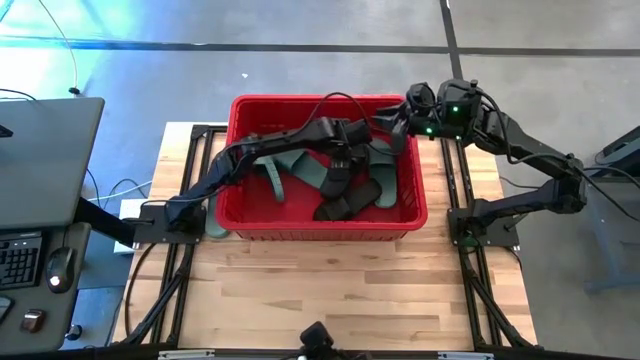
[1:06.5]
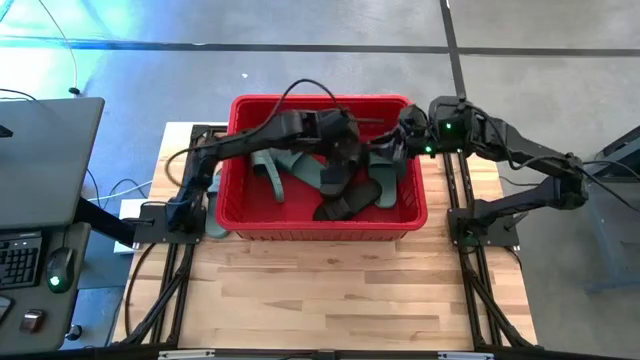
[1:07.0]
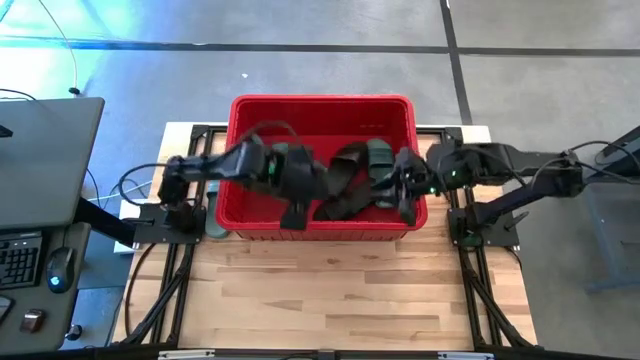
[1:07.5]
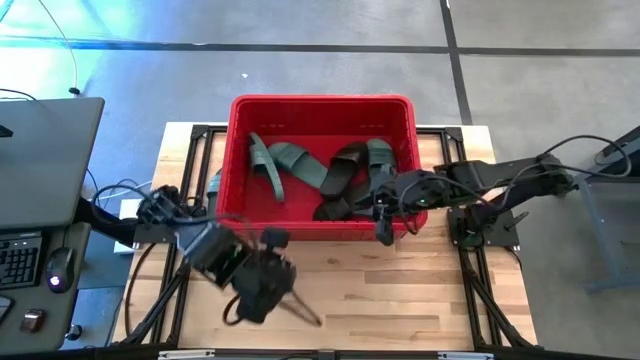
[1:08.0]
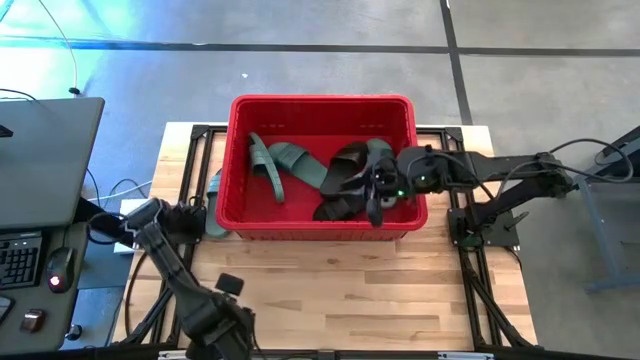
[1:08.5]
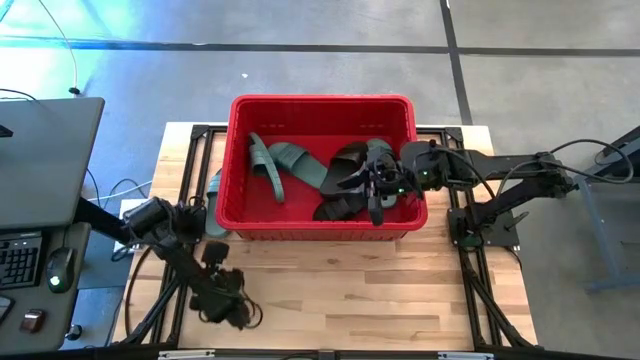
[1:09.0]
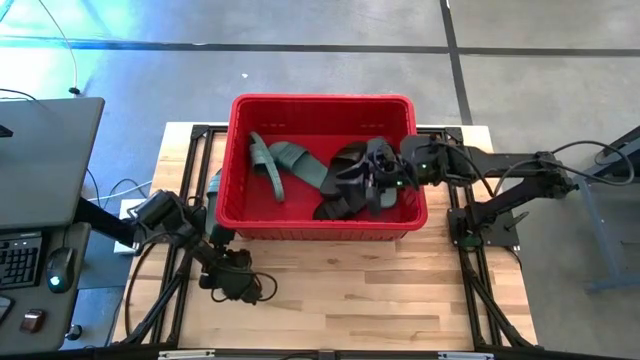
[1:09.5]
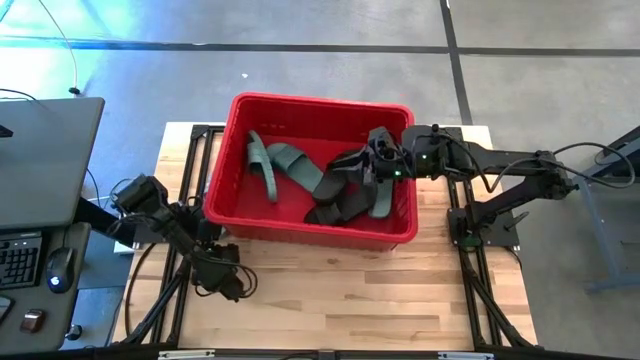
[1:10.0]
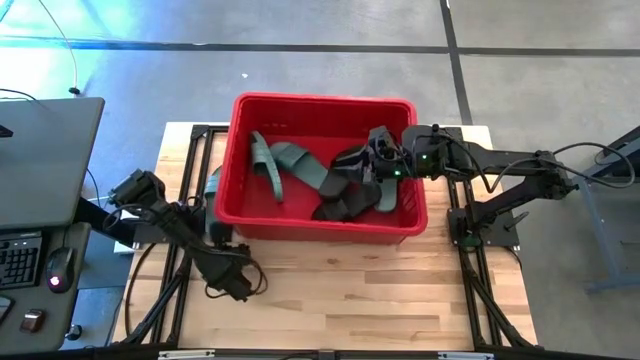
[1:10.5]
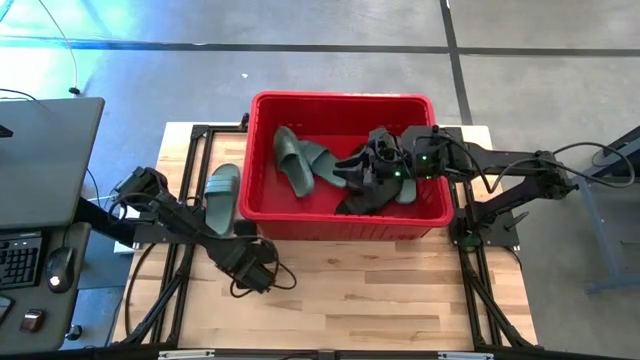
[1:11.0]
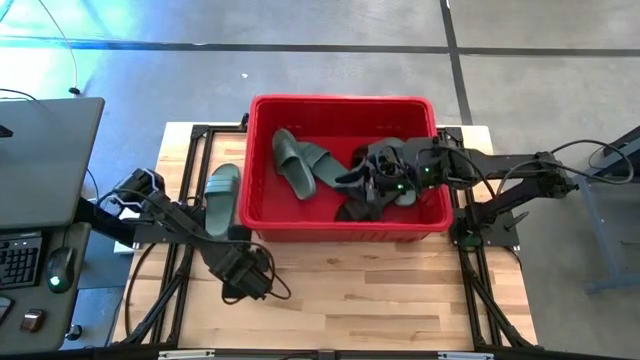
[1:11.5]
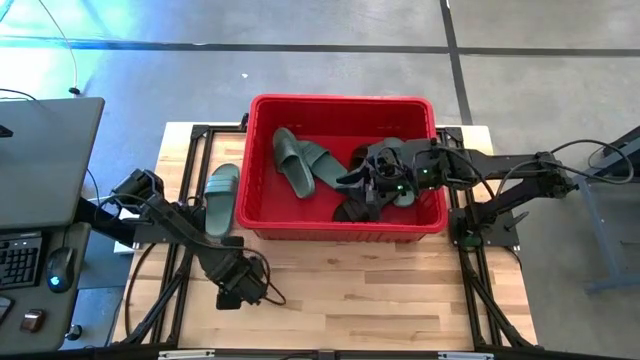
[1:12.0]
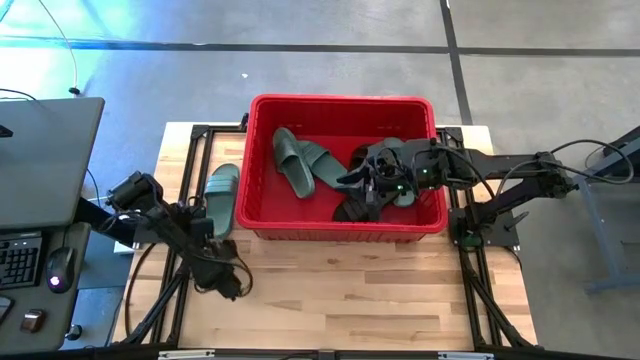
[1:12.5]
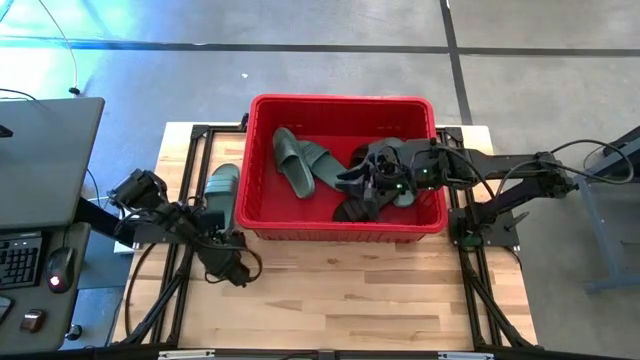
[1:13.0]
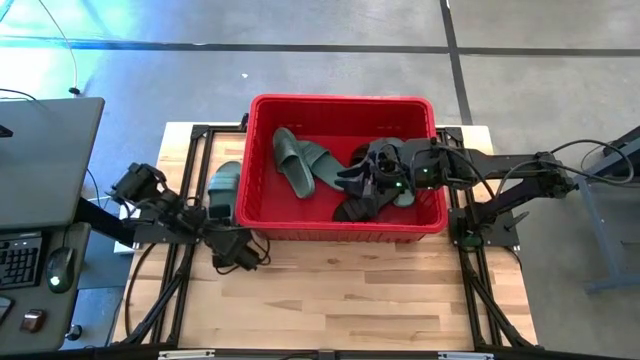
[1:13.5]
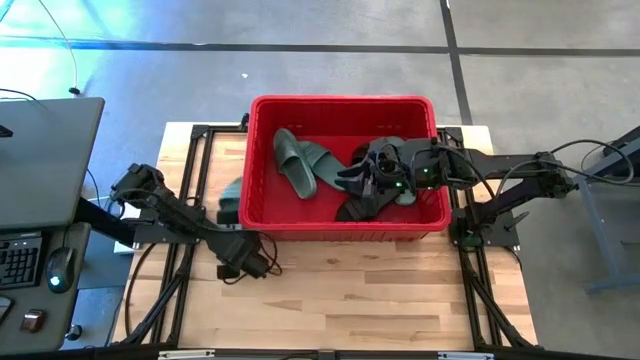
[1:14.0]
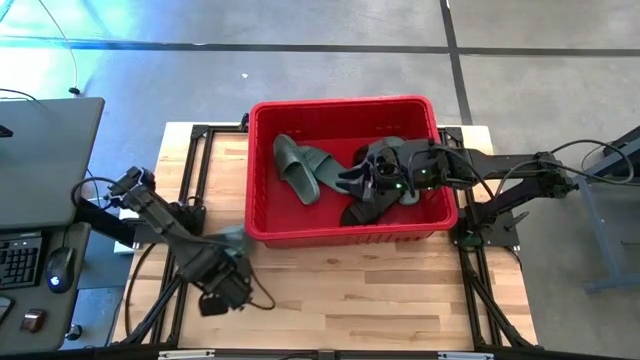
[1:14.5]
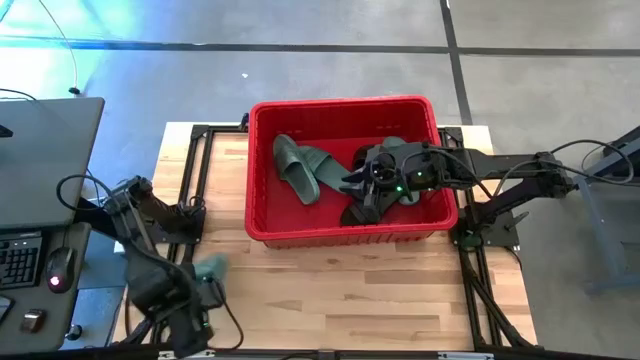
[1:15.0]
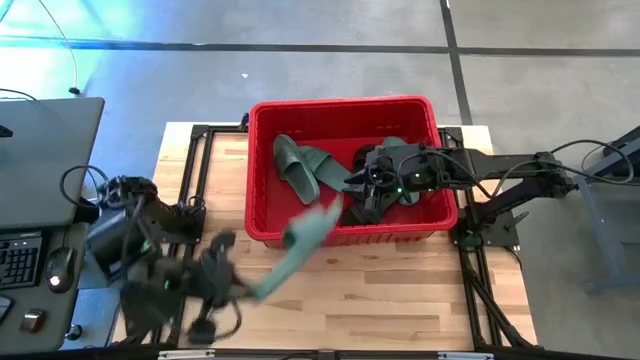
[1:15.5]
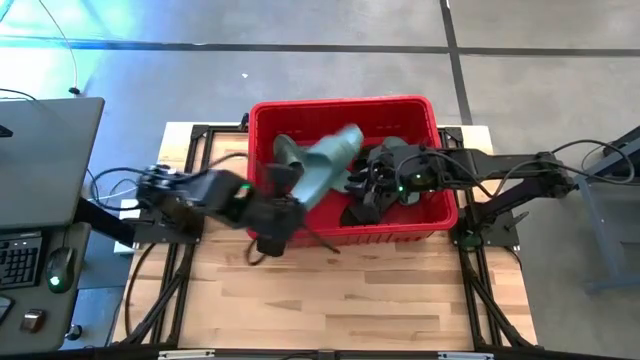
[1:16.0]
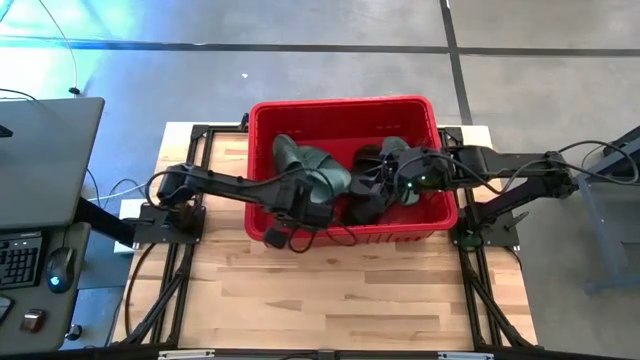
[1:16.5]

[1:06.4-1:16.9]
Task: Pick and place slides into bin
Put the green slide into the red bin

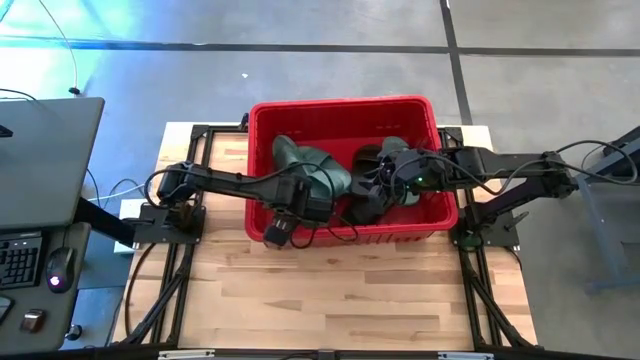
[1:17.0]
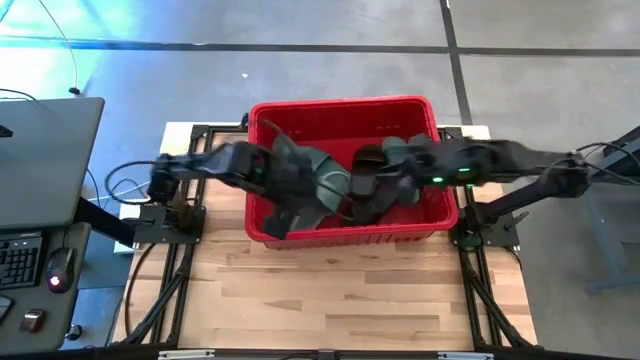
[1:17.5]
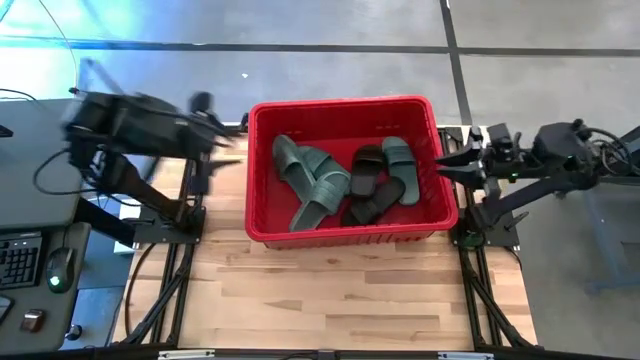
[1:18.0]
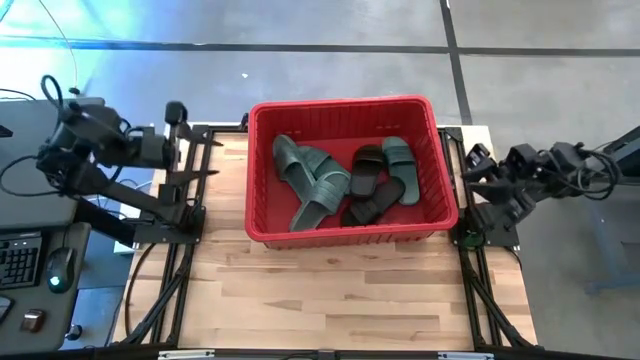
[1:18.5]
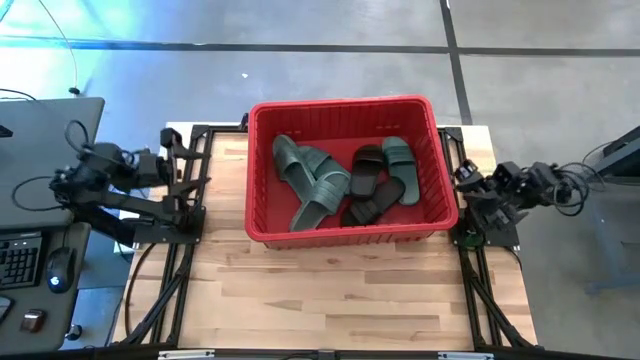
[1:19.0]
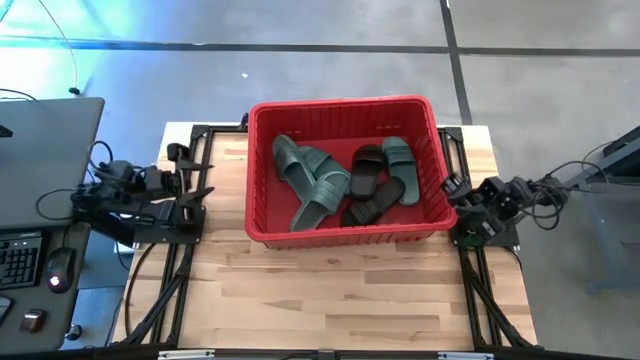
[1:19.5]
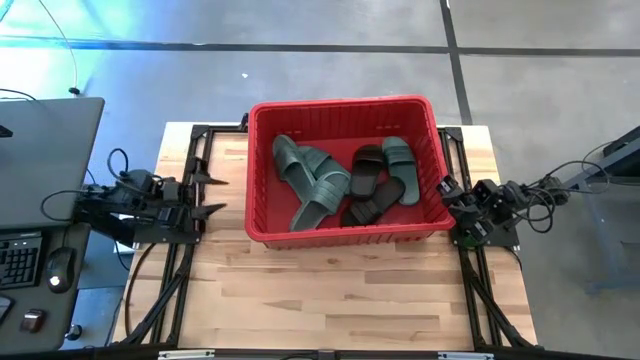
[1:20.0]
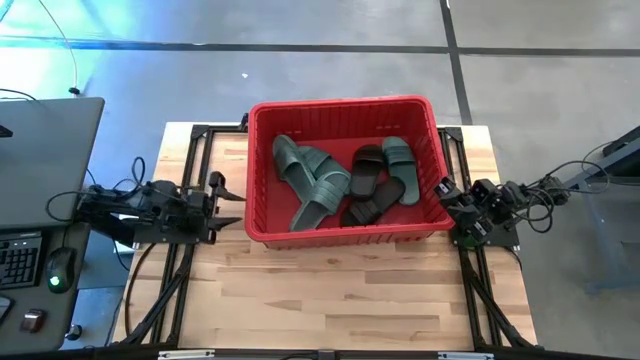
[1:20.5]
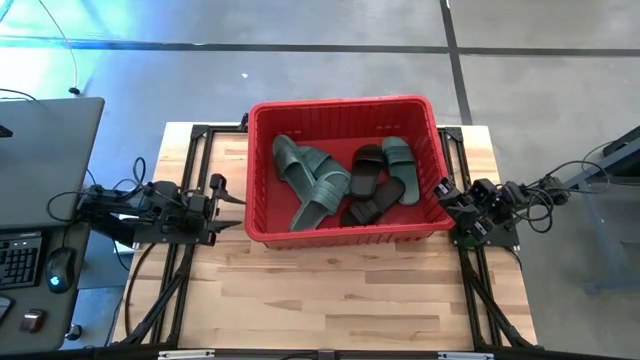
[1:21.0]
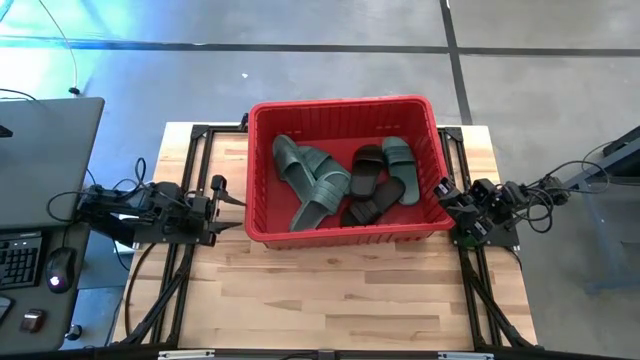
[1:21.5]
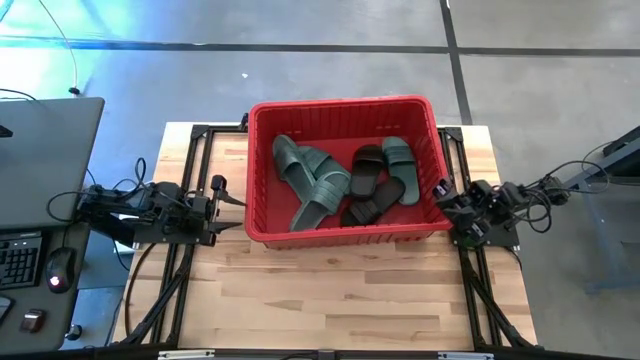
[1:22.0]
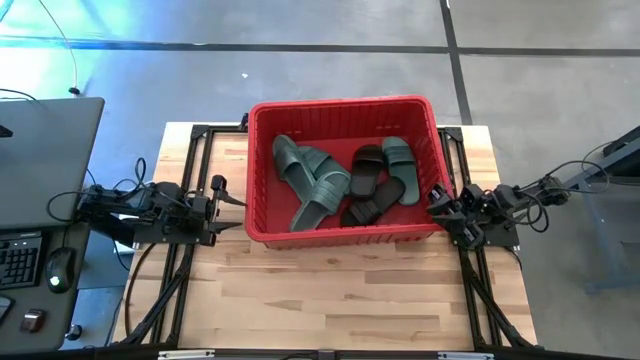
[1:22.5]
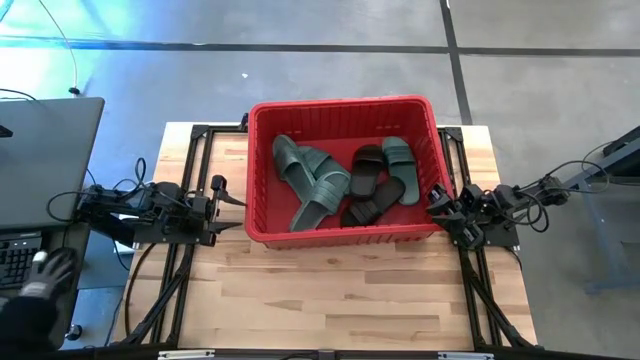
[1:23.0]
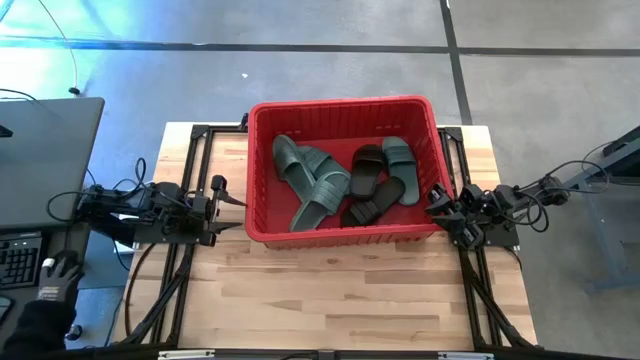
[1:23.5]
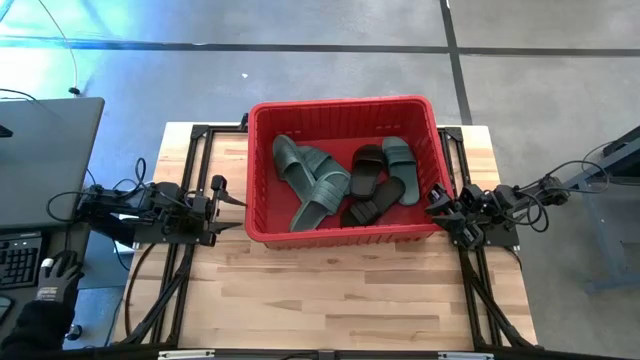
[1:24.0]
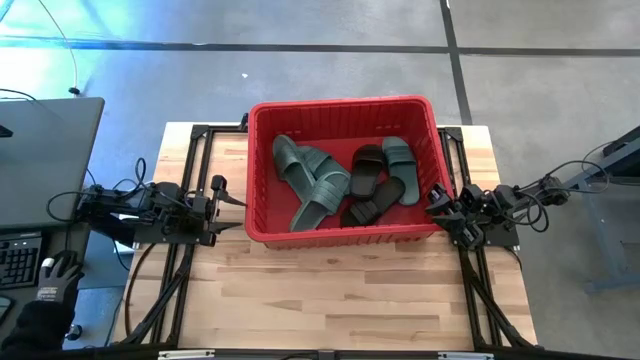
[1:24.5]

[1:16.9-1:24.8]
Return to Home Position

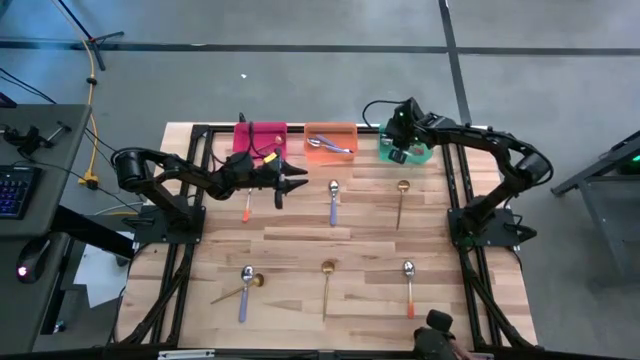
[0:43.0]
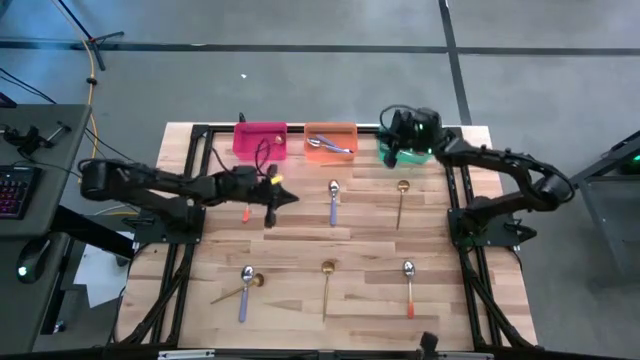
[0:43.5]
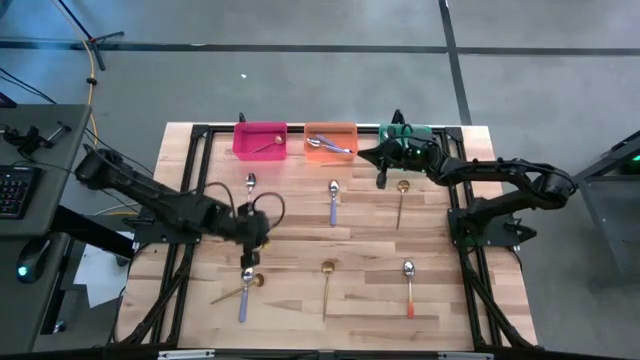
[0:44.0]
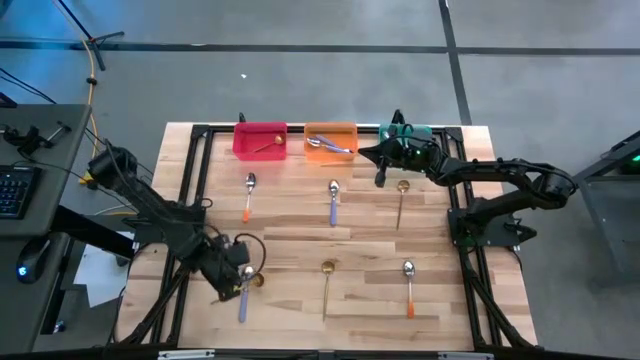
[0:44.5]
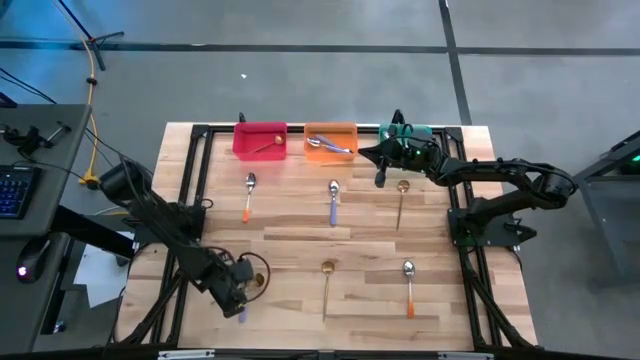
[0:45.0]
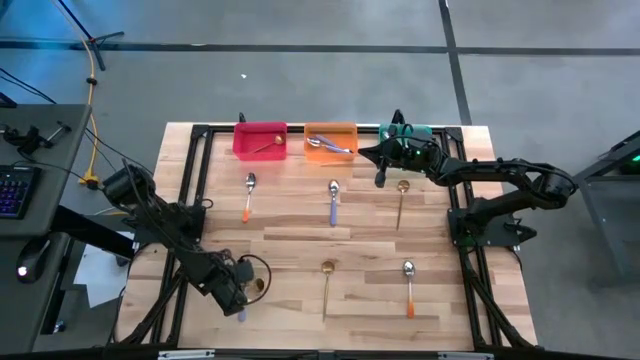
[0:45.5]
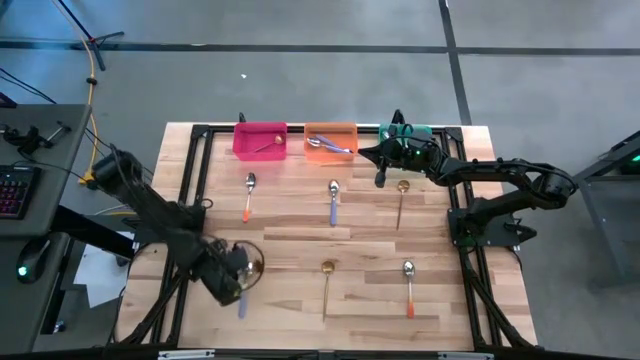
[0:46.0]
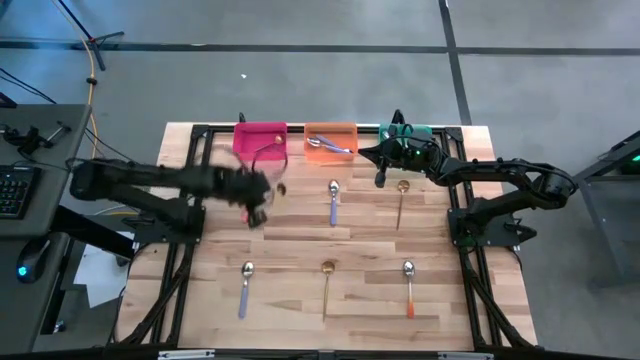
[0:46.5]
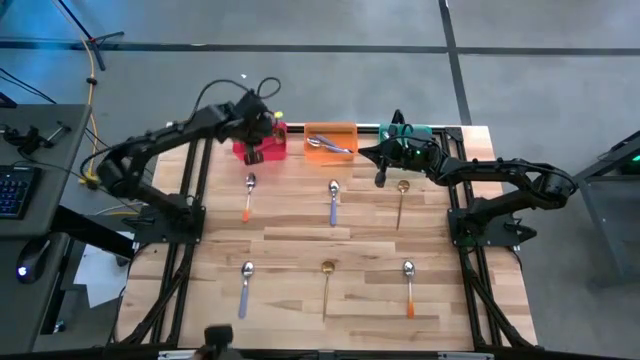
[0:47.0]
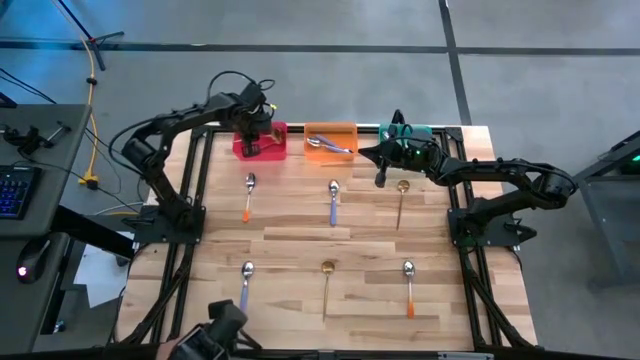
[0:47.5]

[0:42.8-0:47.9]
Task: Sort silverware by color (type)
Put the bottom left gold spoon into the pink bin
